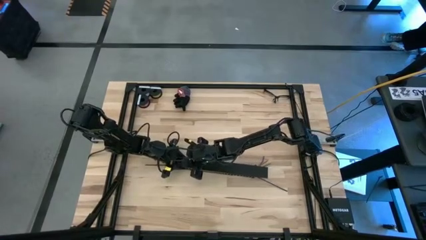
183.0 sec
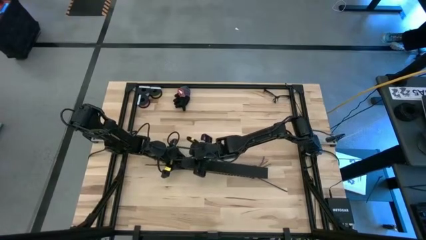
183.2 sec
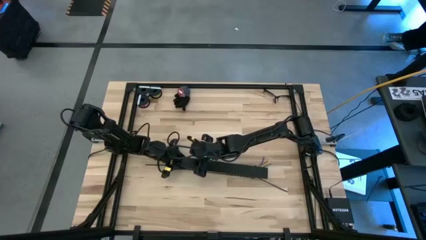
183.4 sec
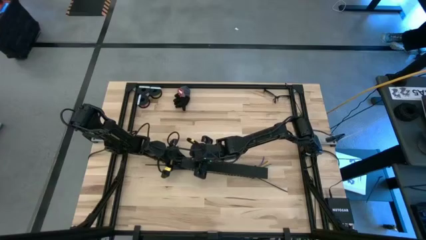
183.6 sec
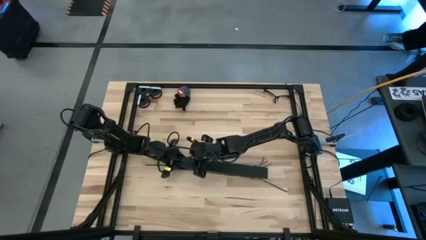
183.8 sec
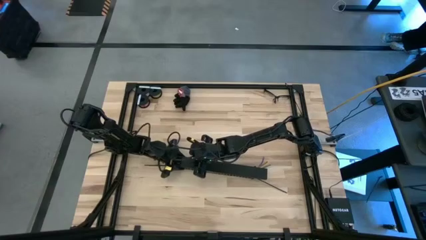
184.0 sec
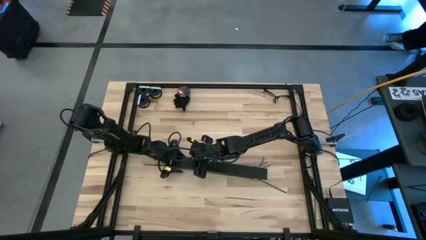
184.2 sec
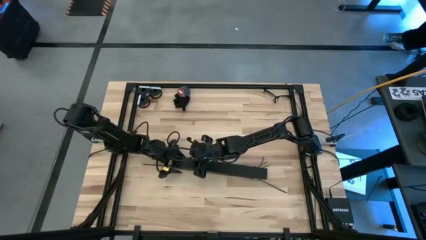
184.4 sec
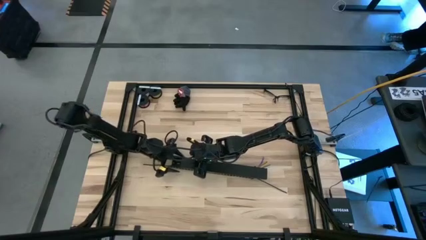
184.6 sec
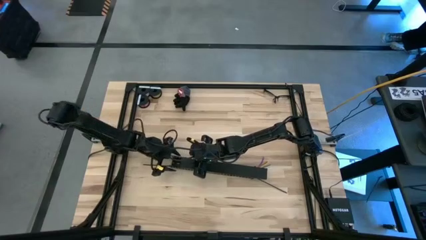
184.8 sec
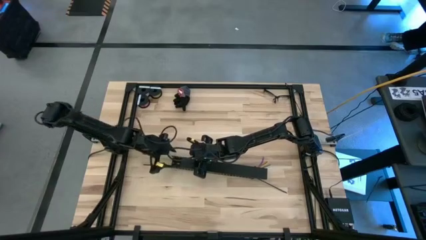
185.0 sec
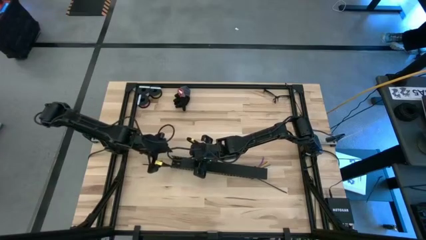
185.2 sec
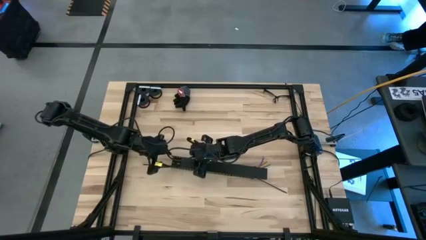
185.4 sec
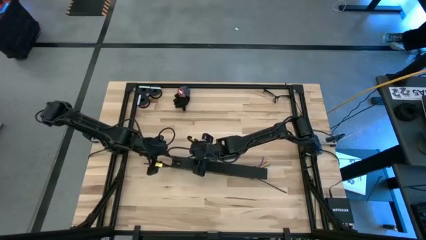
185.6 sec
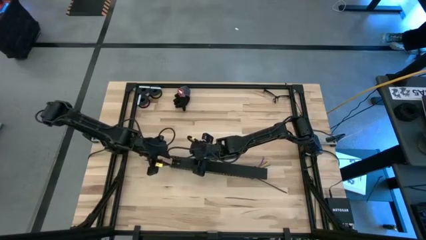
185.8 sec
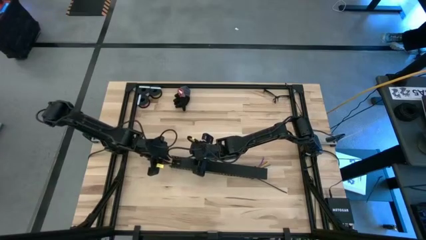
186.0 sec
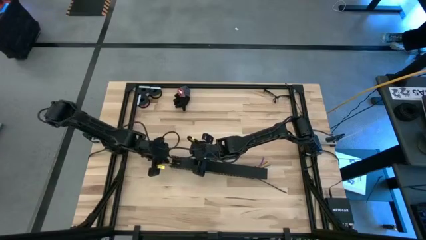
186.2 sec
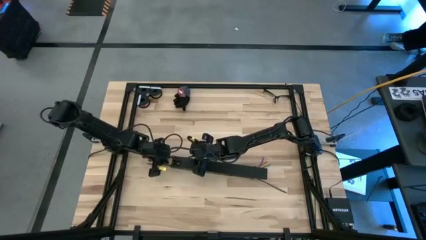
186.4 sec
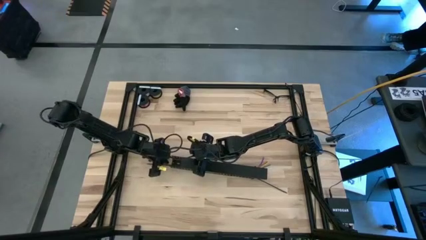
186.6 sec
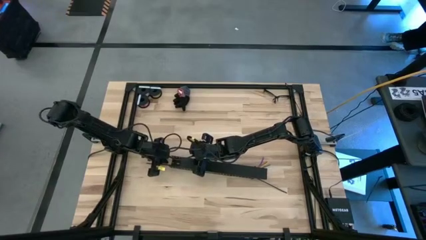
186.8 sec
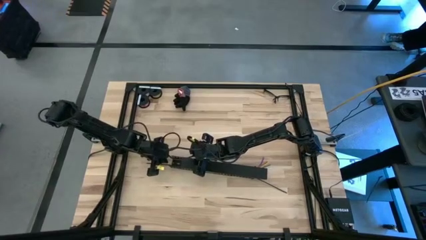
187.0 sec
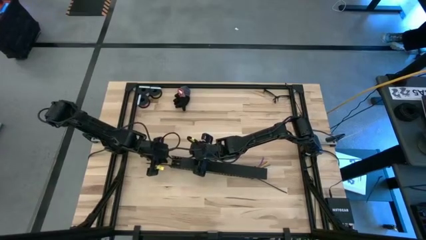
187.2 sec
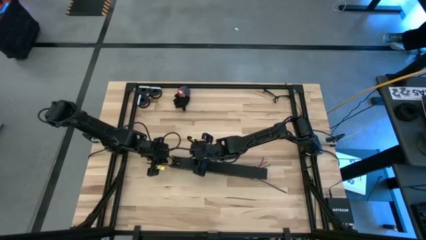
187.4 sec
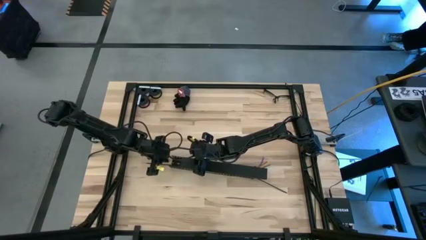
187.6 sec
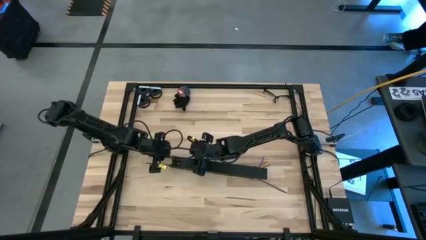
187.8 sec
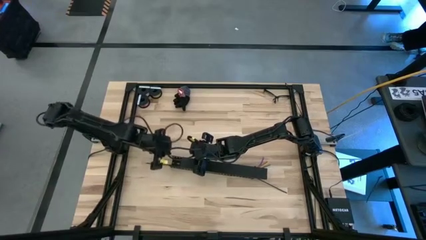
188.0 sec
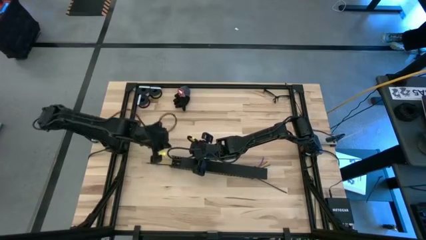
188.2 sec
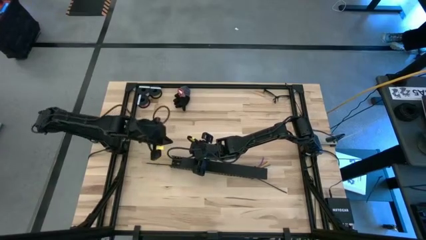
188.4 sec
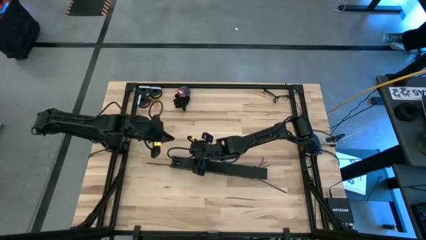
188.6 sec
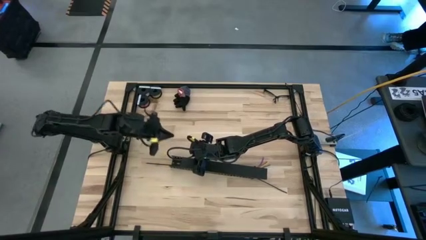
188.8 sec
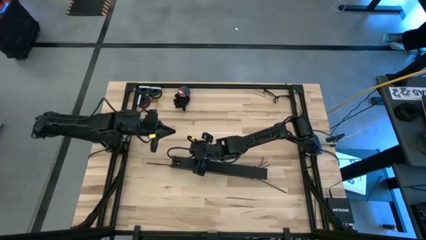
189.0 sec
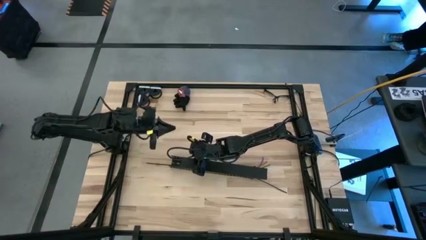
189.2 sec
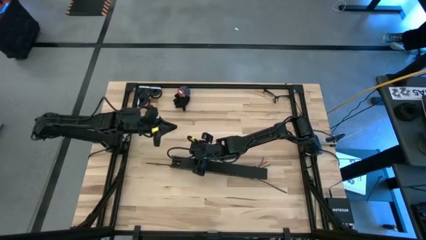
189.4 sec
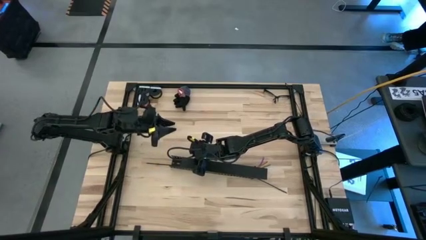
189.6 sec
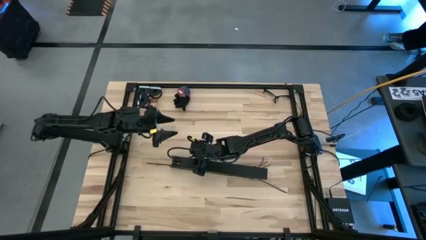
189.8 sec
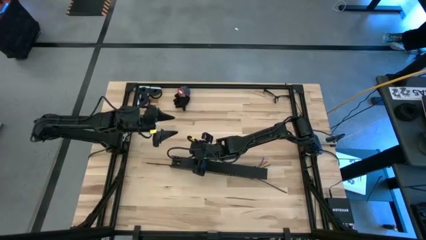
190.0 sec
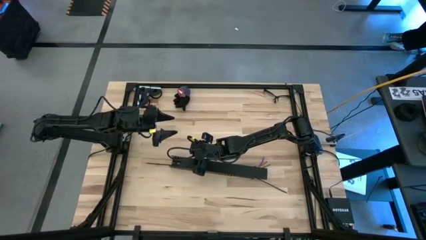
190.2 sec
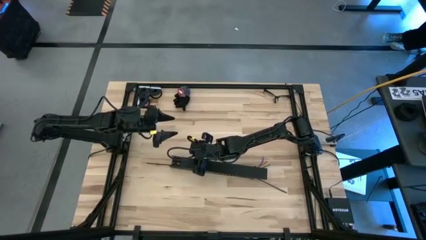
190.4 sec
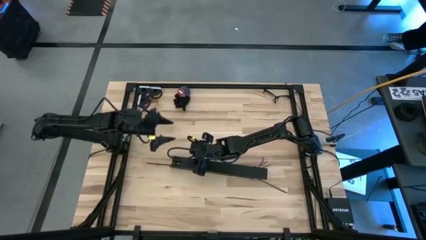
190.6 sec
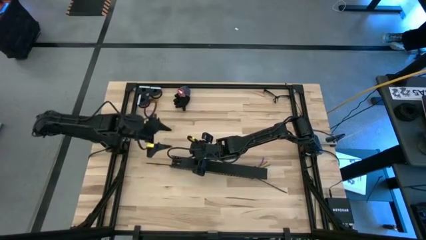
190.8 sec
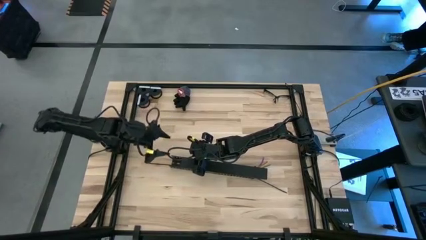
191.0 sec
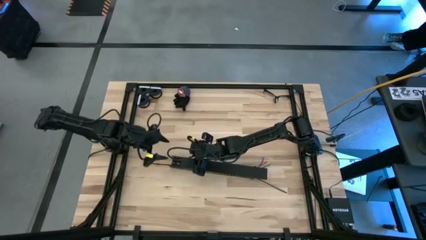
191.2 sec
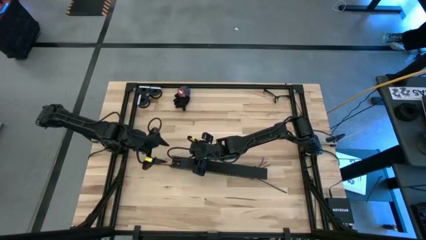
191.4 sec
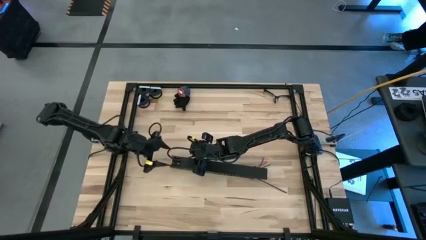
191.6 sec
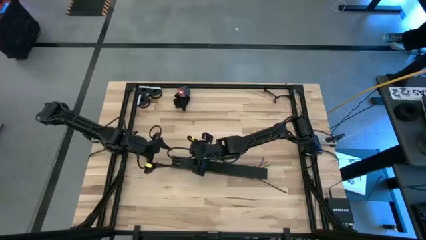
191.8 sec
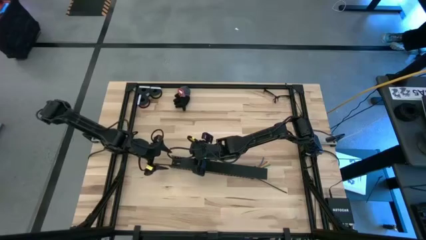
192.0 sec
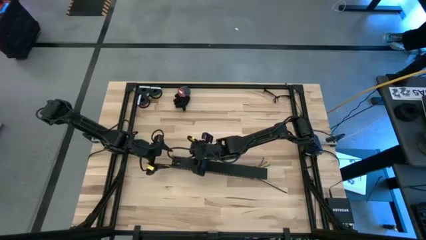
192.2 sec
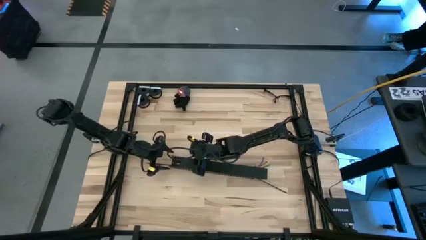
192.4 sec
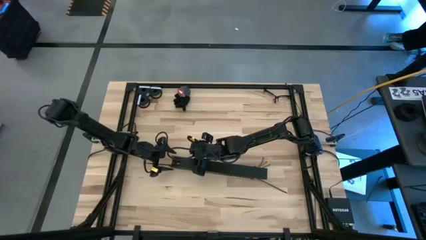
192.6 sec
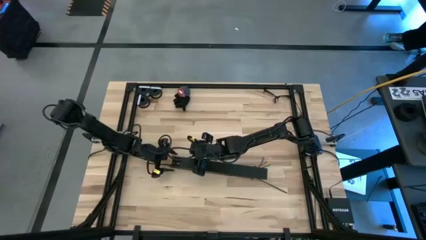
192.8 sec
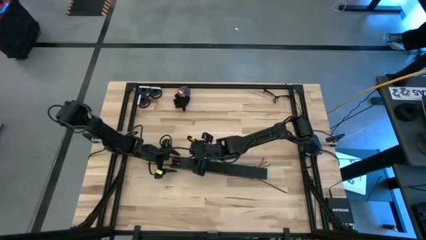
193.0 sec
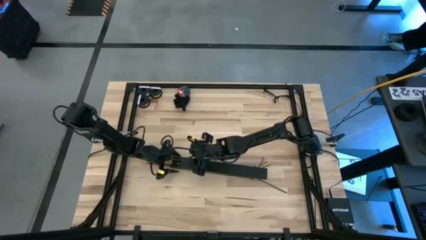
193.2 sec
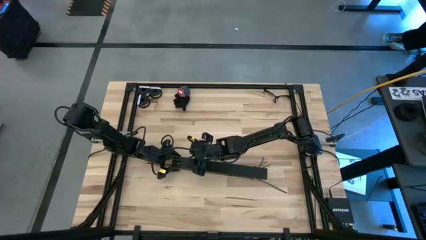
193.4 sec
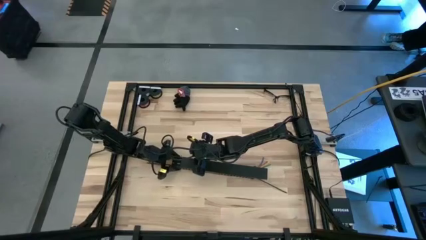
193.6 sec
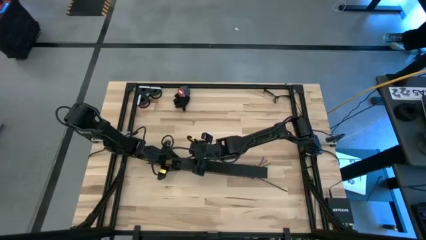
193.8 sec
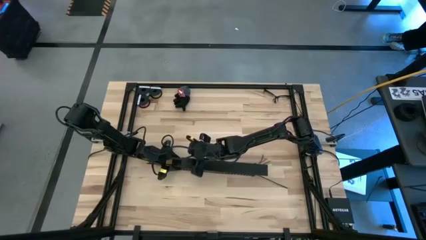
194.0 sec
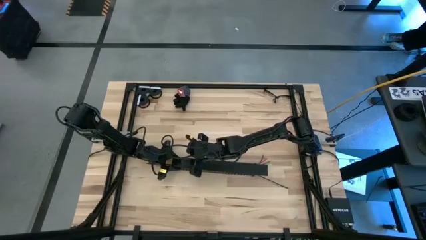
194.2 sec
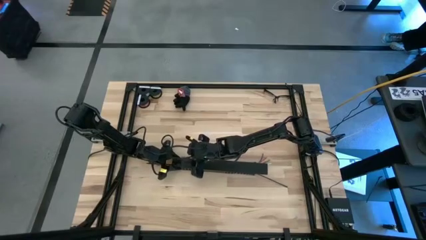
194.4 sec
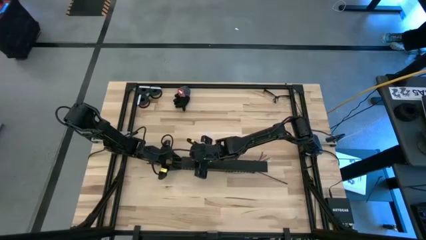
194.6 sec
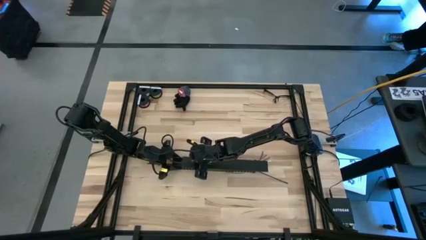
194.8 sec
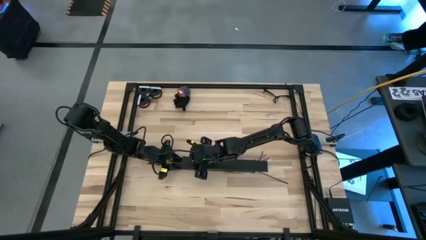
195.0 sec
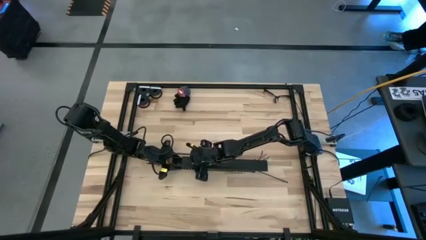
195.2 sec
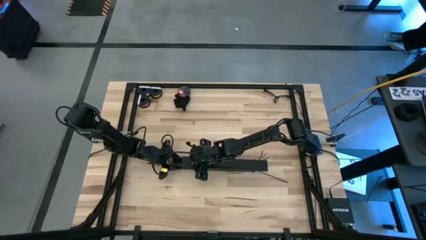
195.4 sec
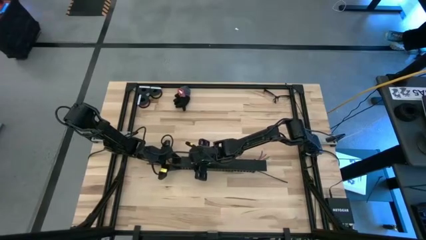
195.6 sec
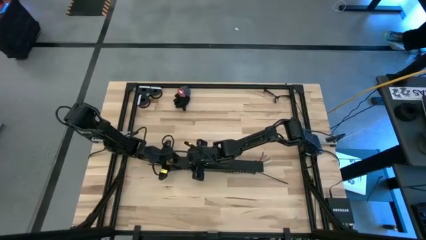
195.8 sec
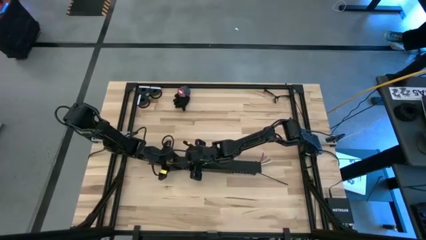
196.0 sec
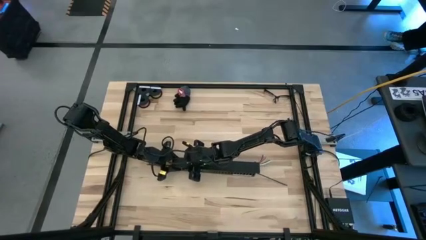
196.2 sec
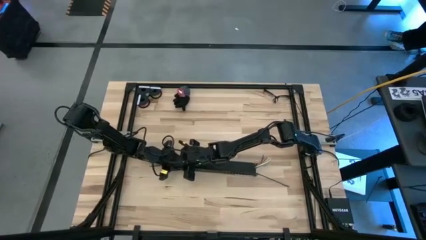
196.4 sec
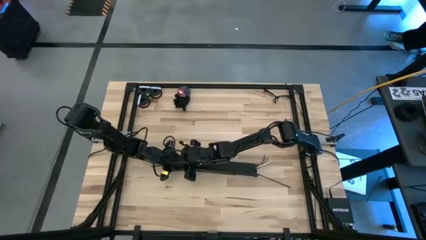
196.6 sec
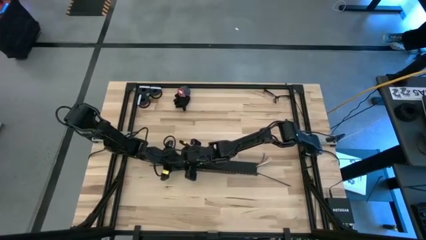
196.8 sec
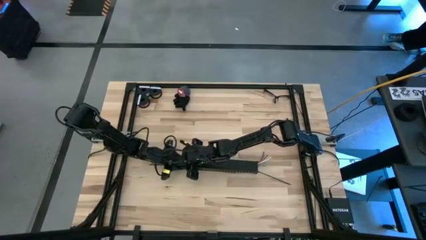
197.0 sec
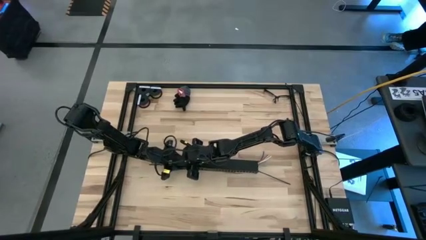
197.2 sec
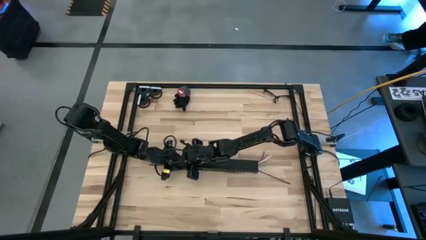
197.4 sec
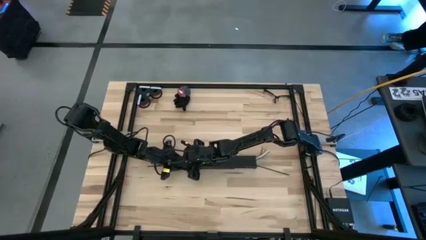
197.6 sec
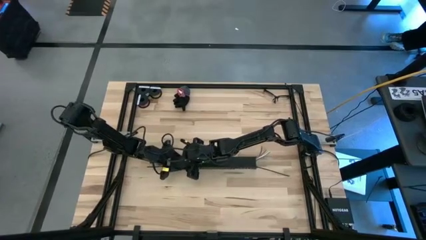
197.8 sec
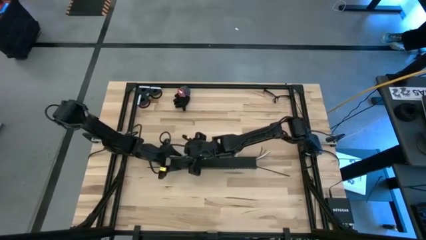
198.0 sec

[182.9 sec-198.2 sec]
Task: Ziptie cables
Close the black cable duct with the cable duct cover
